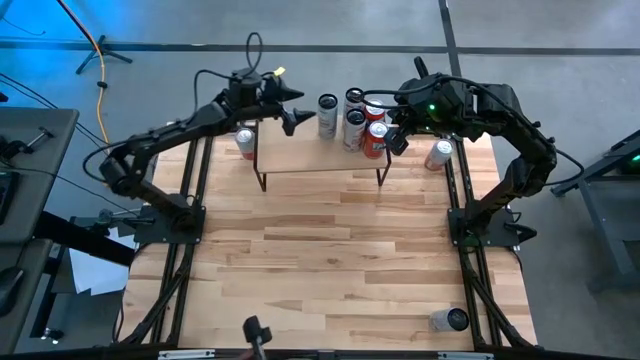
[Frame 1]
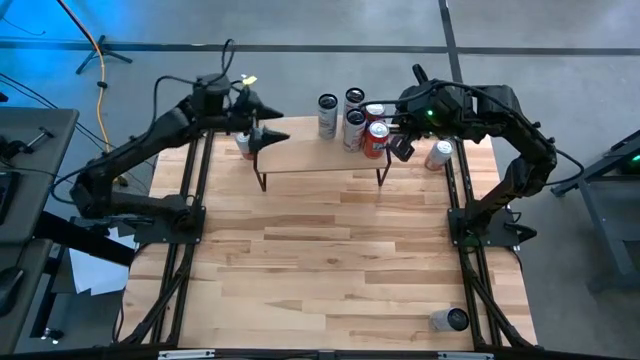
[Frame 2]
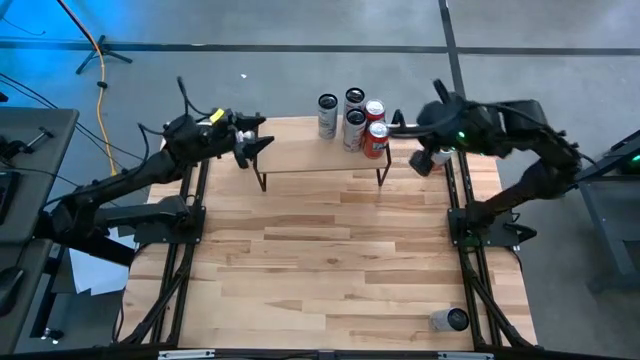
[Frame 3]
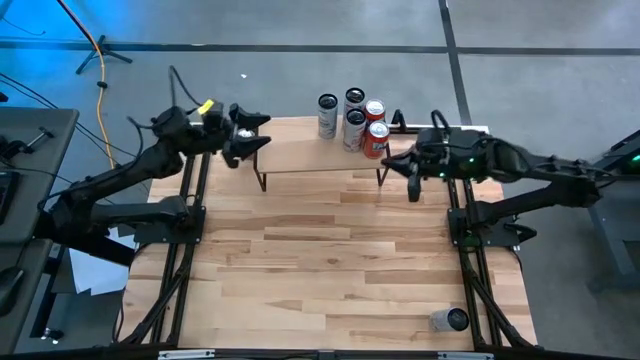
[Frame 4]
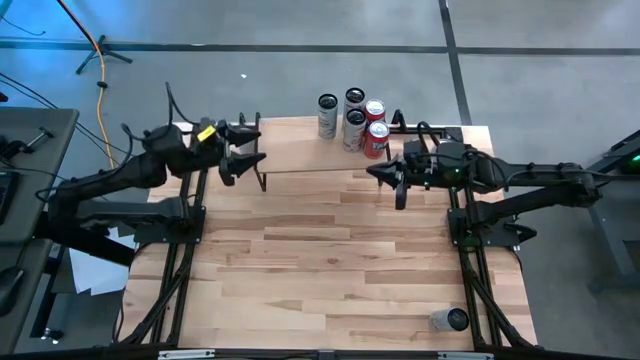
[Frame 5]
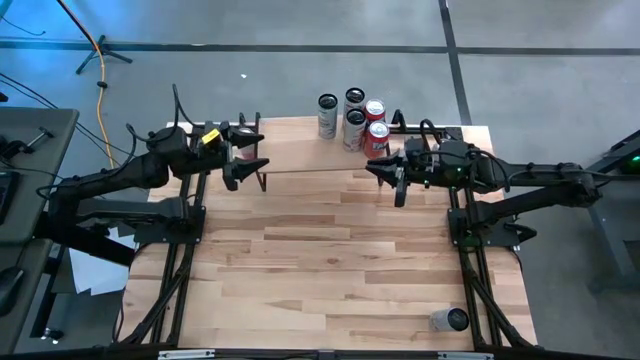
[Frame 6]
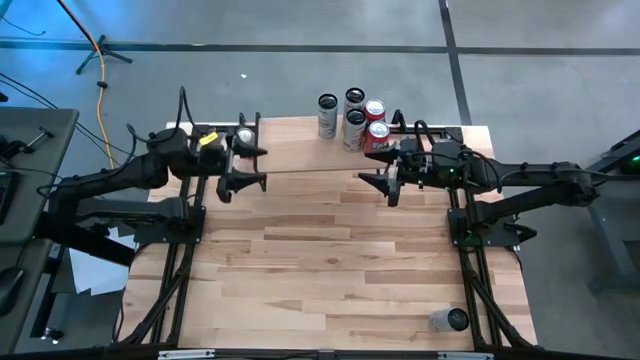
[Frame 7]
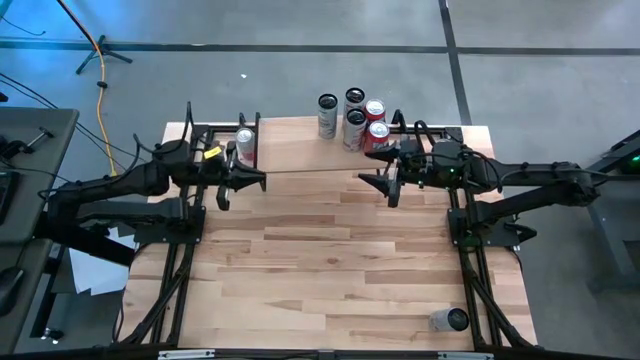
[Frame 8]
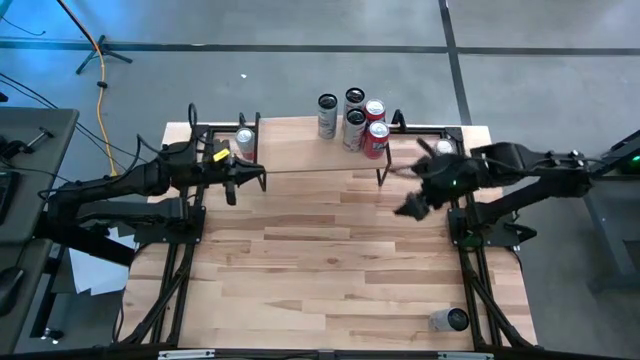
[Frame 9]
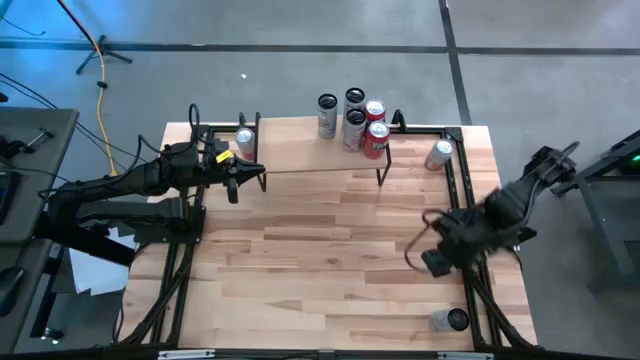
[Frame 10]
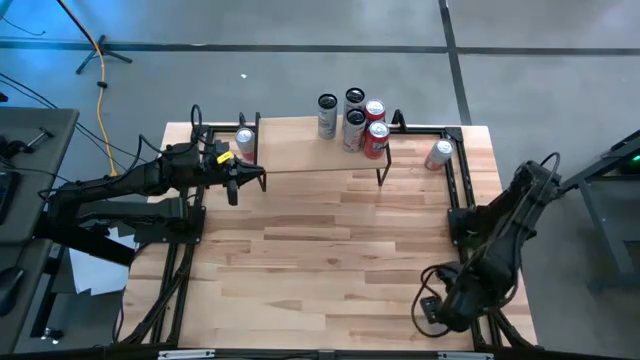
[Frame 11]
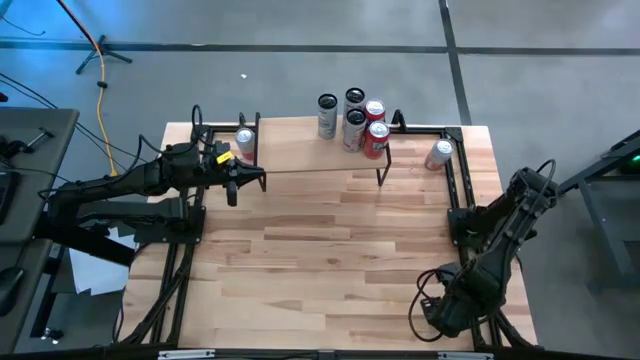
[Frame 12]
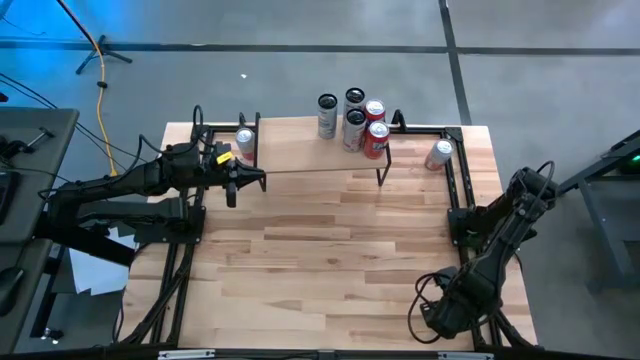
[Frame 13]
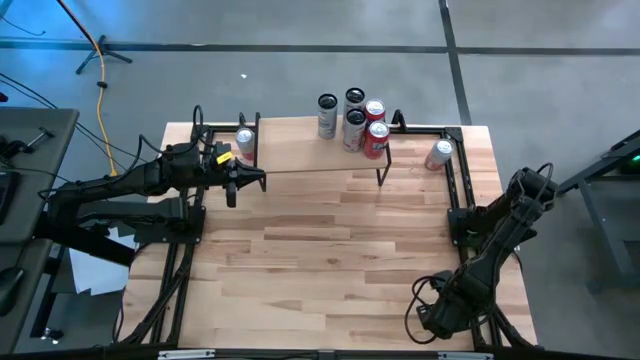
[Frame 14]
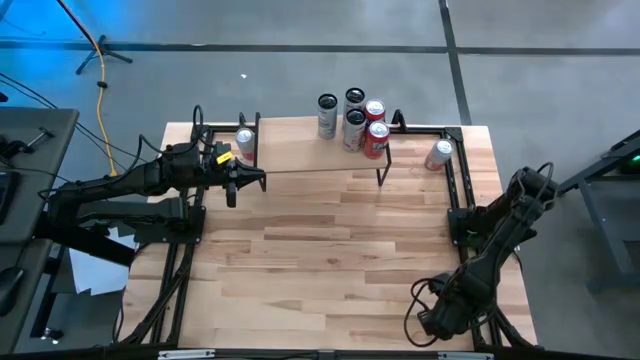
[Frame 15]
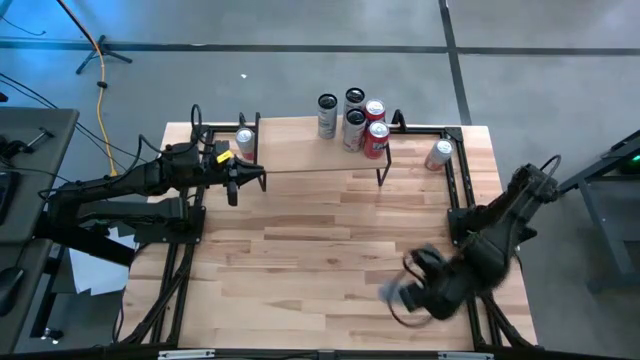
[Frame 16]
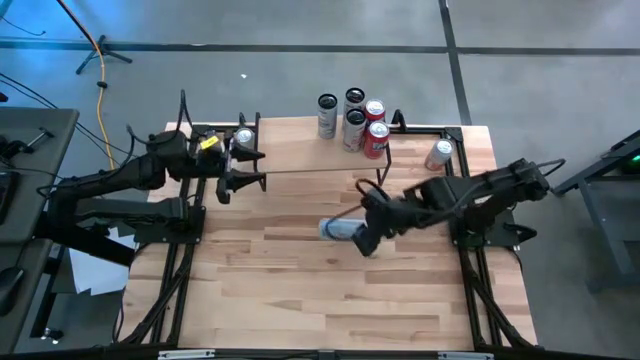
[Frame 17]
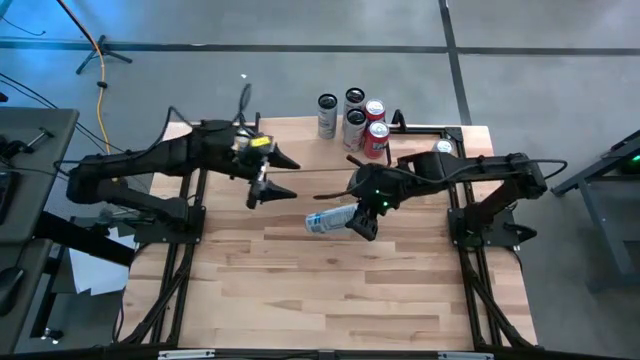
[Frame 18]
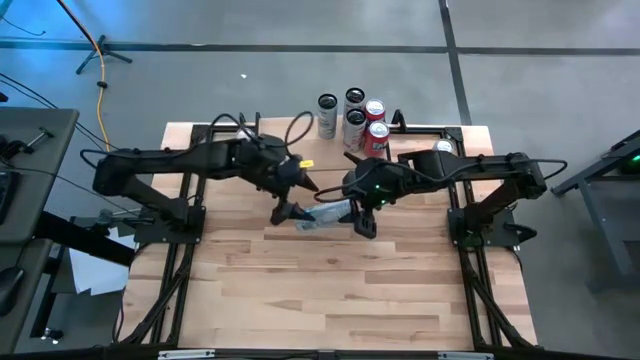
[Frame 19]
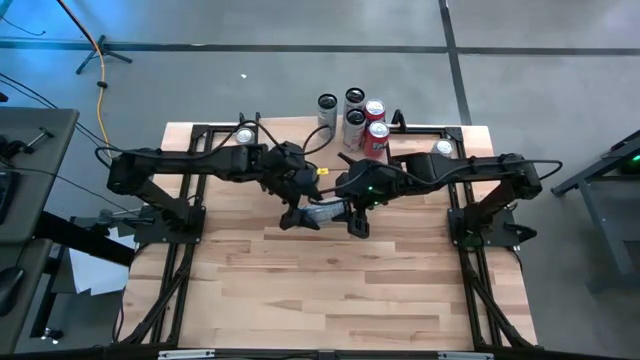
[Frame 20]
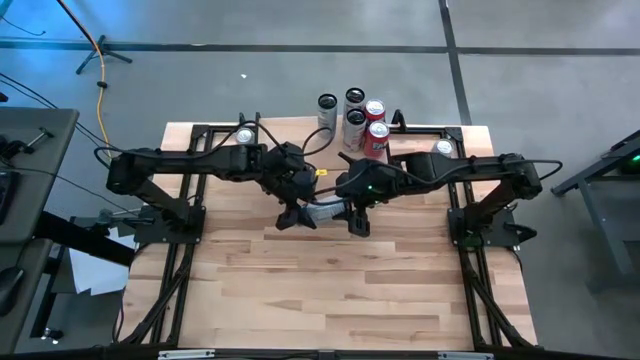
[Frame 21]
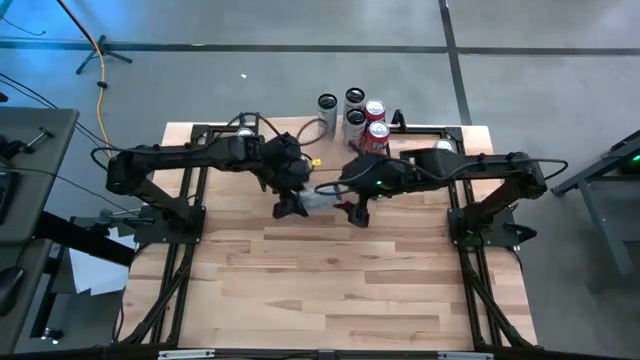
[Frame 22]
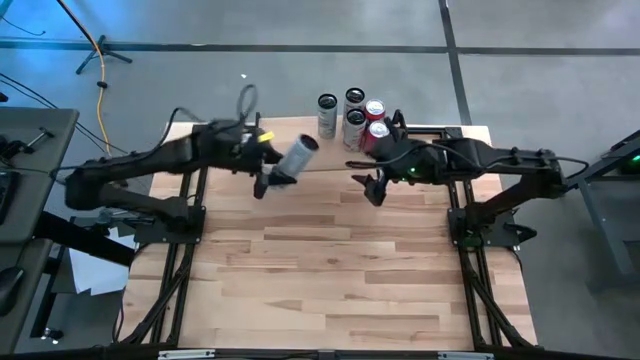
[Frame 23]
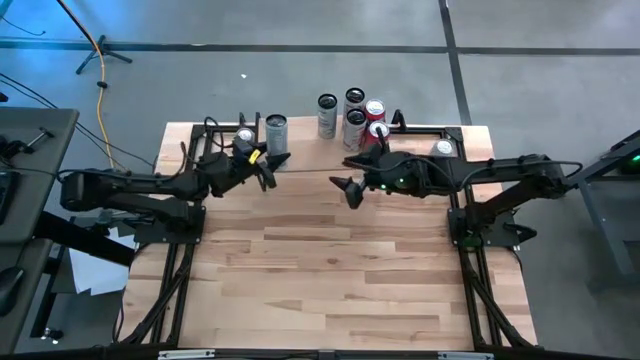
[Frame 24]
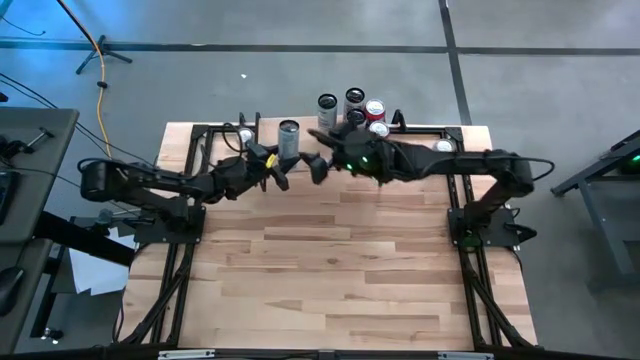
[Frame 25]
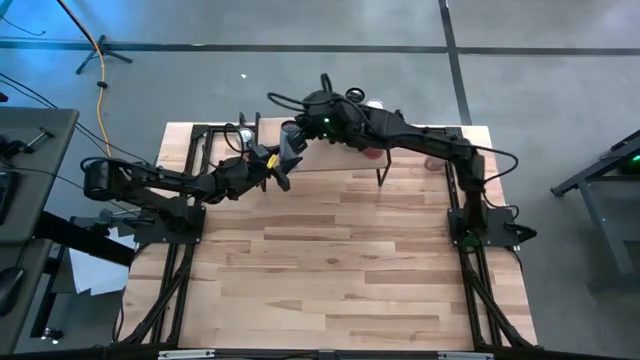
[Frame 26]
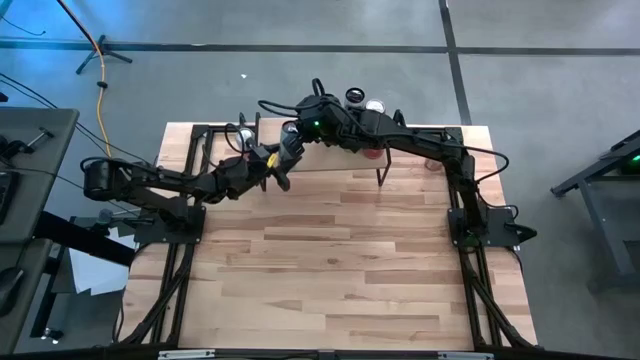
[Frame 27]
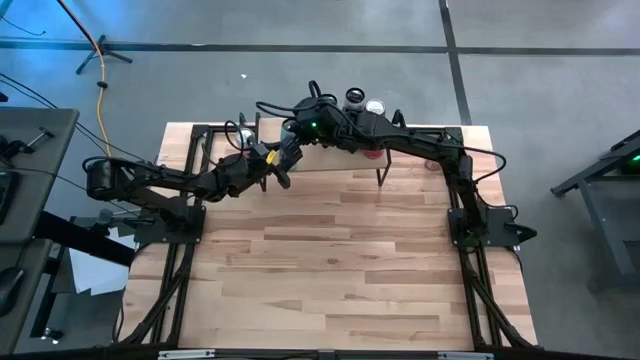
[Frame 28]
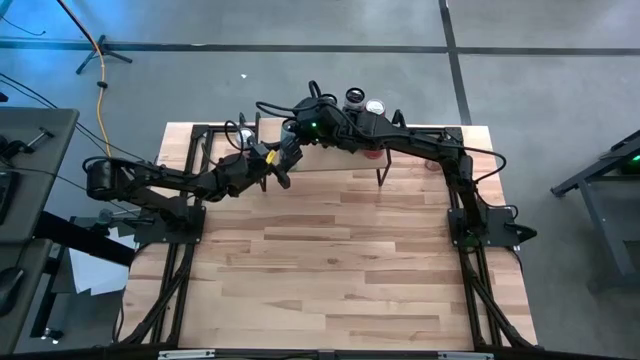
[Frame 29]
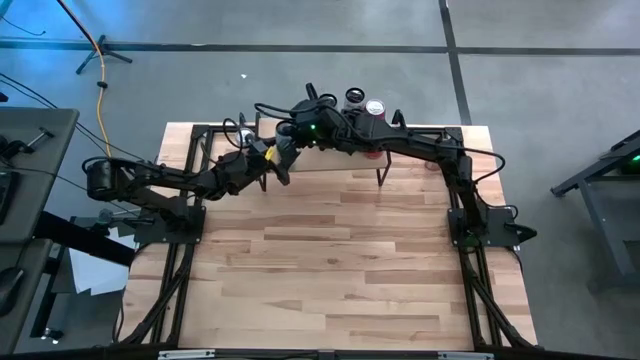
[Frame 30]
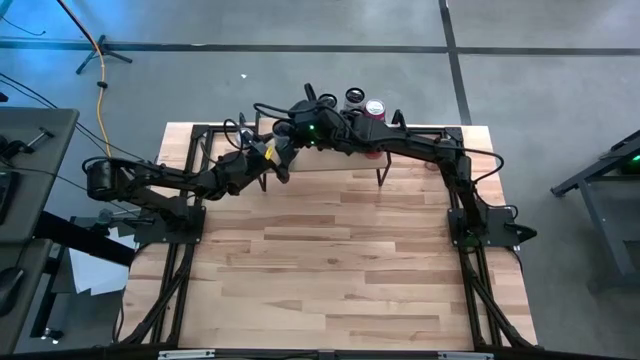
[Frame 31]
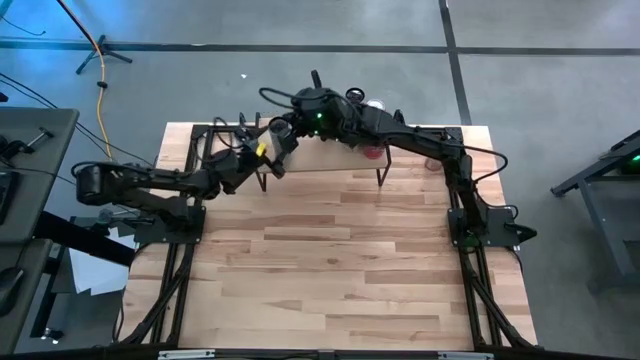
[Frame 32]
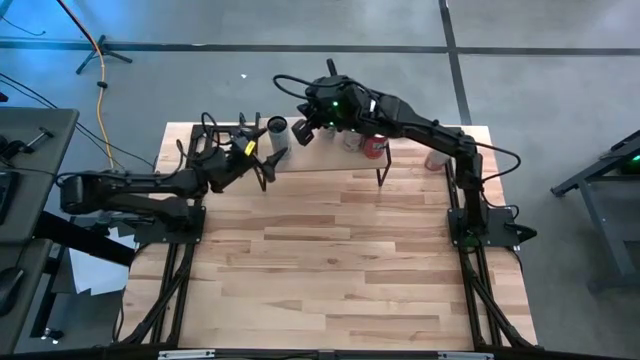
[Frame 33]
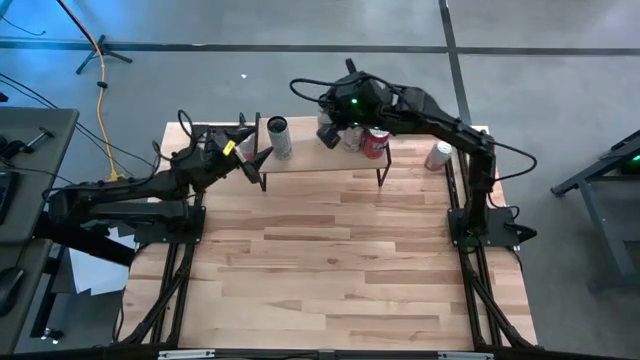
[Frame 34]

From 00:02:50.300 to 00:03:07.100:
Task: Place canned beverage on shelf
Put the black blue soda can on the shelf

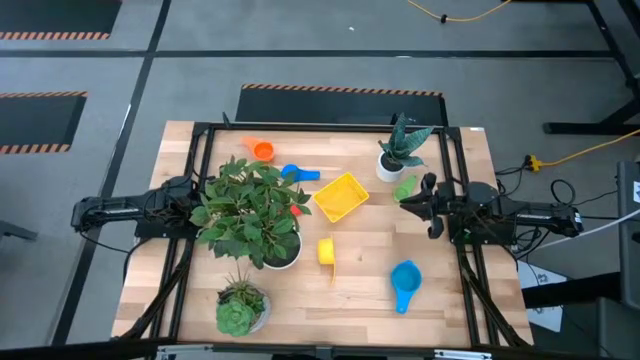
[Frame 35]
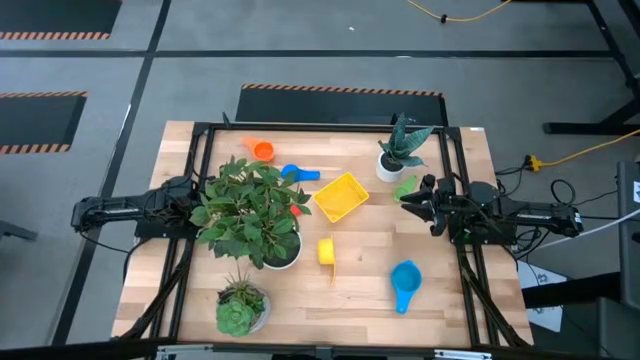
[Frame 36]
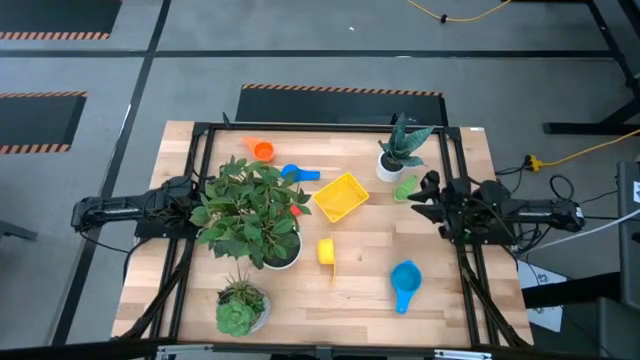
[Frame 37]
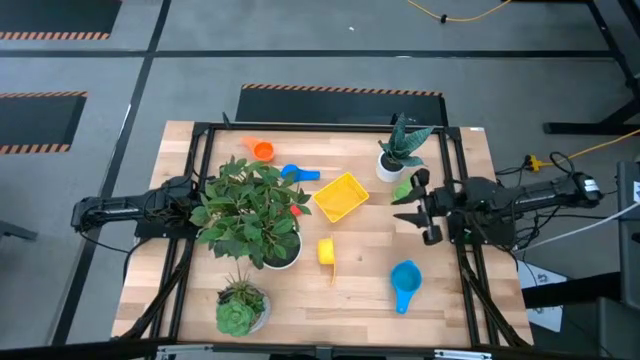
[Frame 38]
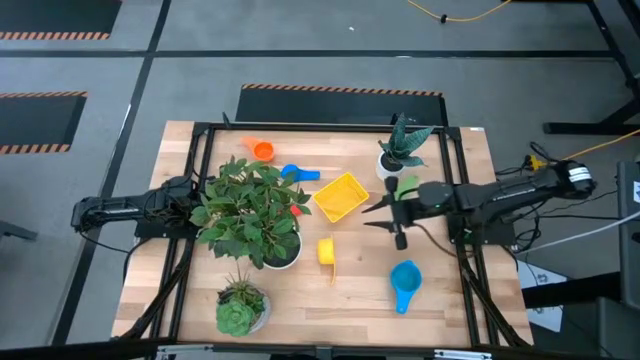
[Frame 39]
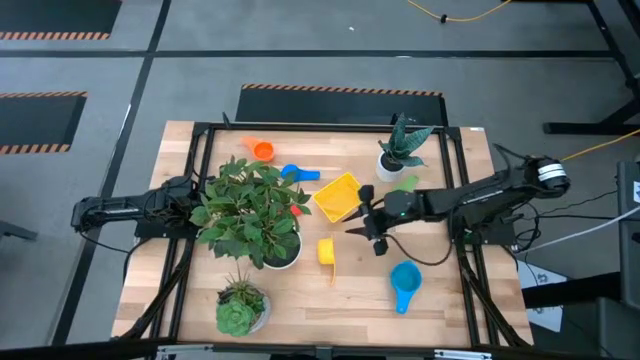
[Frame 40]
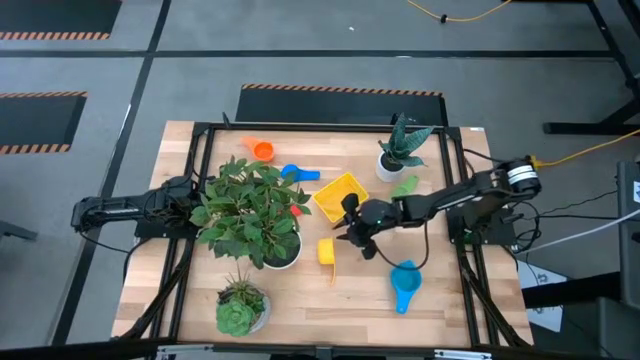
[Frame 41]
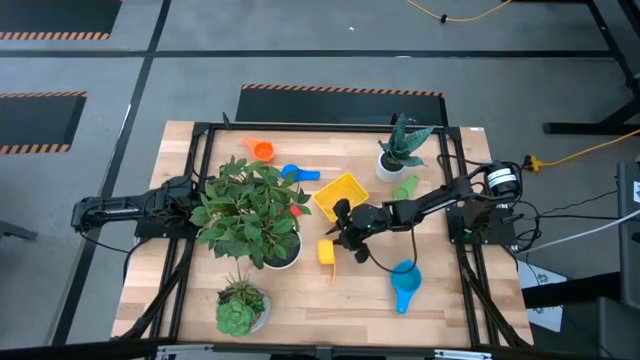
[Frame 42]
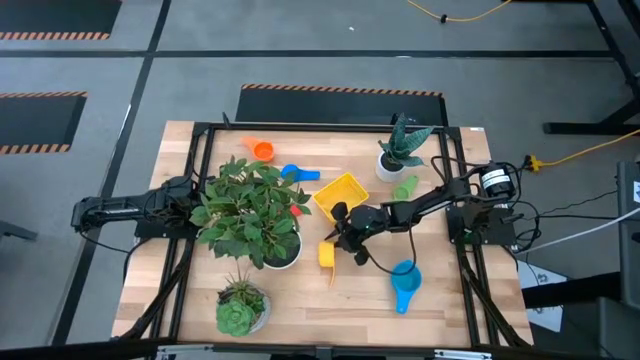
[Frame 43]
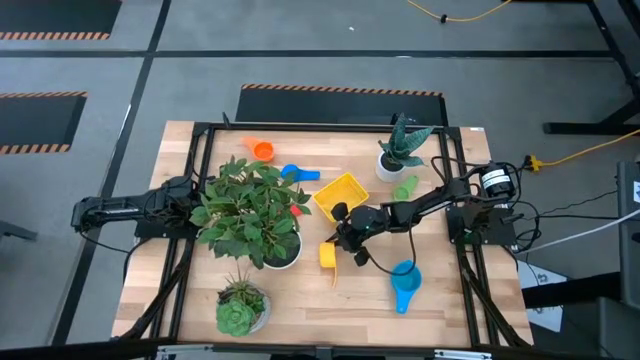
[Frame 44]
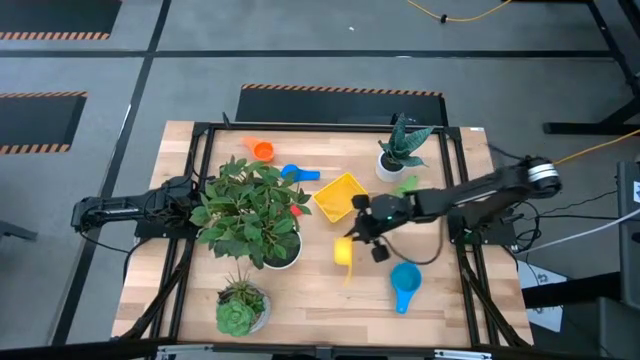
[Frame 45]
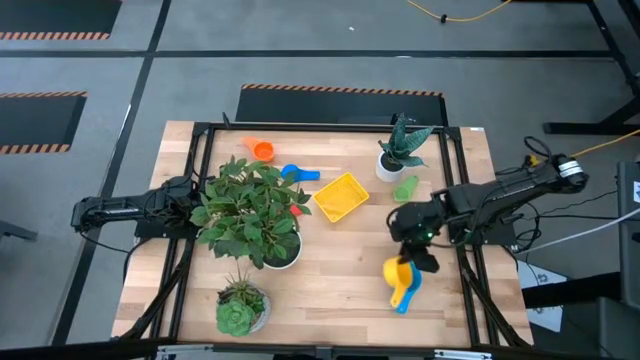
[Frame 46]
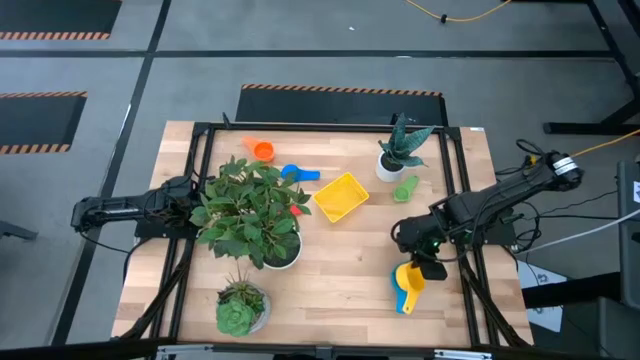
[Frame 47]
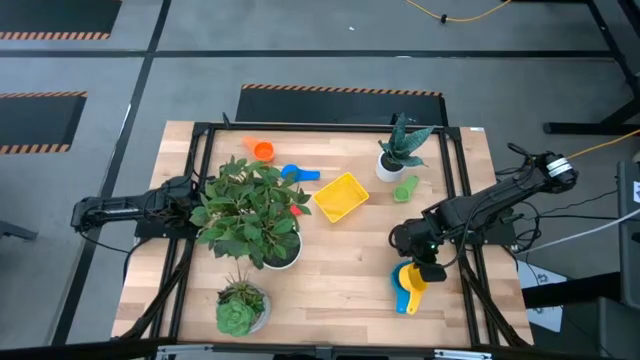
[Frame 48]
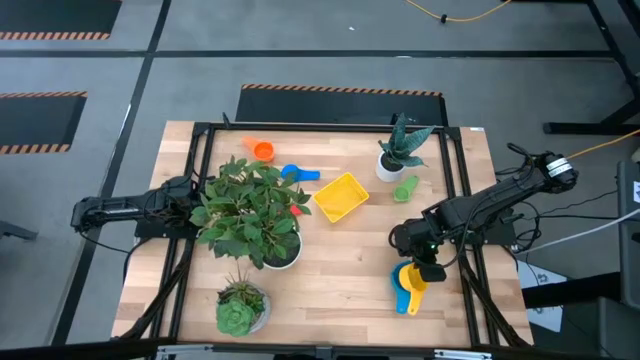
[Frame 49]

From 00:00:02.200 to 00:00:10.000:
Task: Nest measuring cups in basket
Stack the yellow measuring cup on top of the light blue measuring cup
